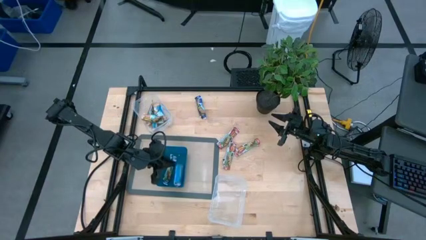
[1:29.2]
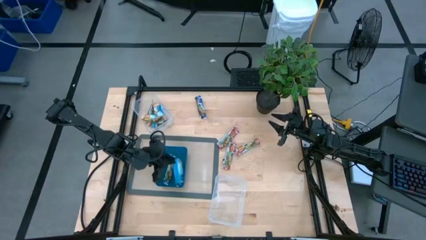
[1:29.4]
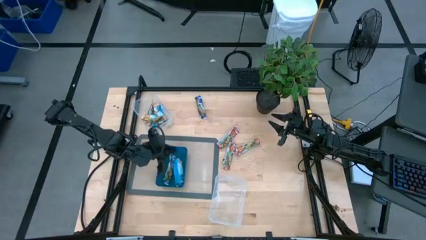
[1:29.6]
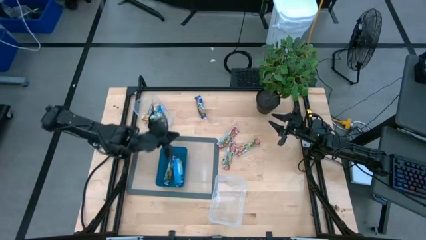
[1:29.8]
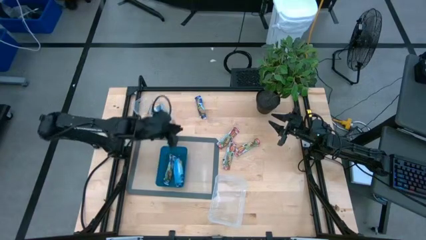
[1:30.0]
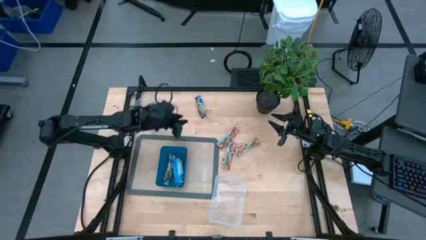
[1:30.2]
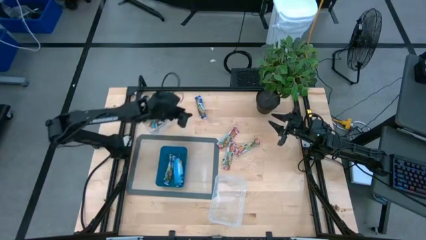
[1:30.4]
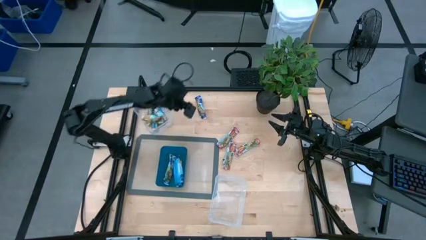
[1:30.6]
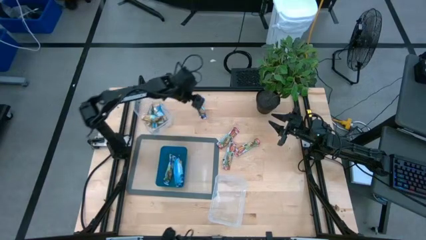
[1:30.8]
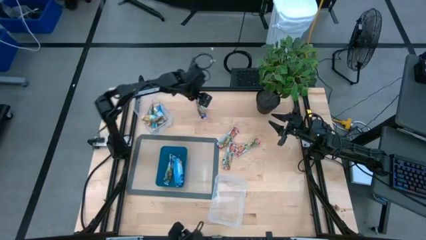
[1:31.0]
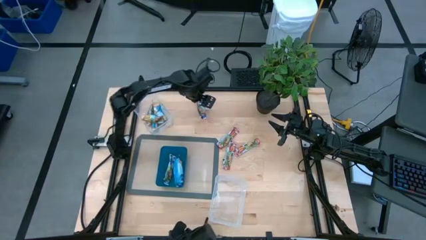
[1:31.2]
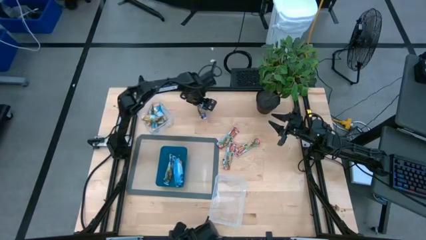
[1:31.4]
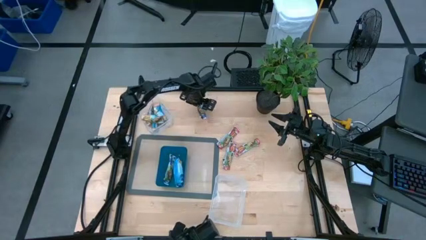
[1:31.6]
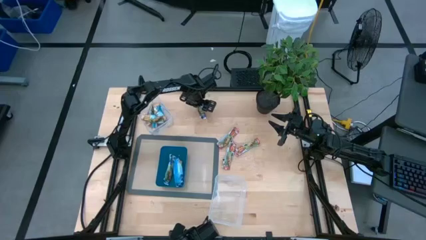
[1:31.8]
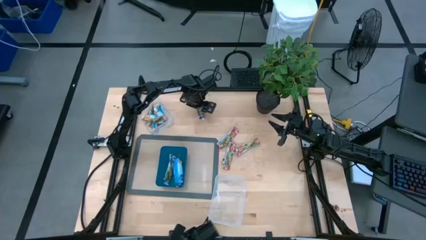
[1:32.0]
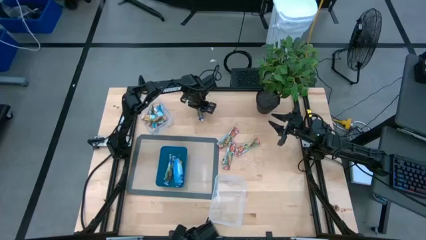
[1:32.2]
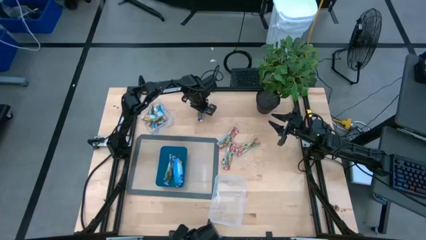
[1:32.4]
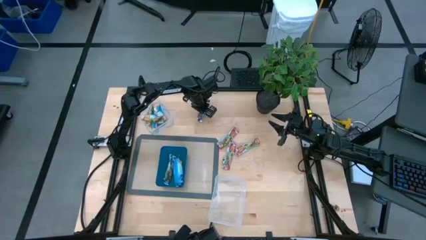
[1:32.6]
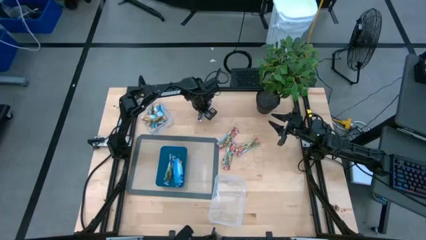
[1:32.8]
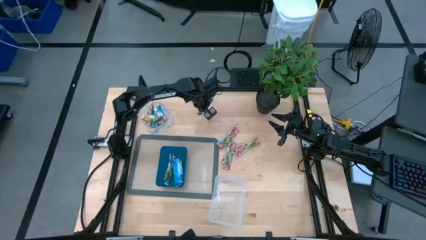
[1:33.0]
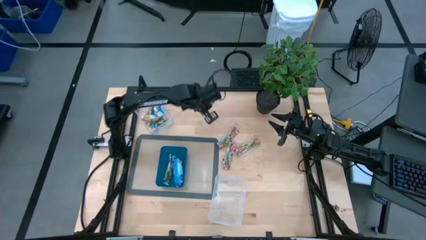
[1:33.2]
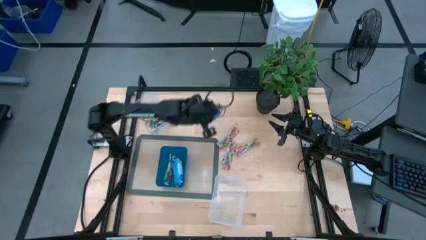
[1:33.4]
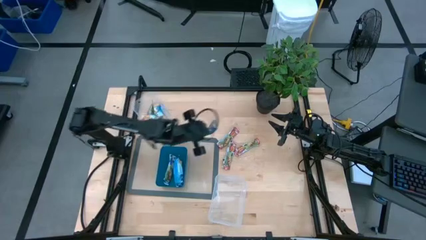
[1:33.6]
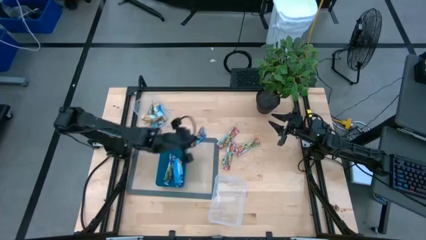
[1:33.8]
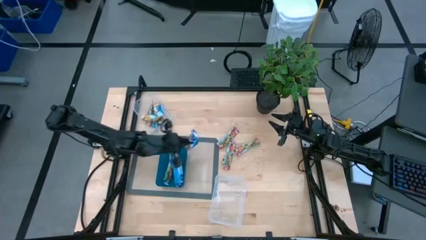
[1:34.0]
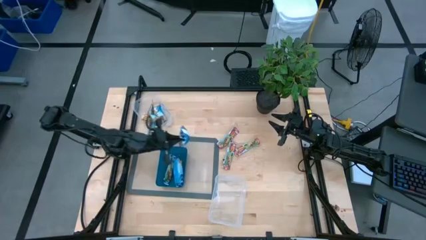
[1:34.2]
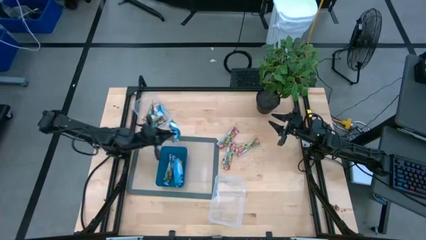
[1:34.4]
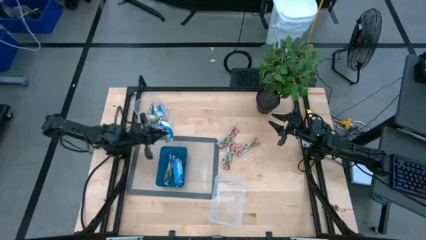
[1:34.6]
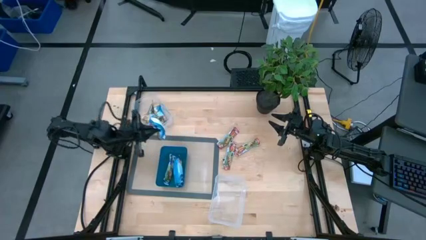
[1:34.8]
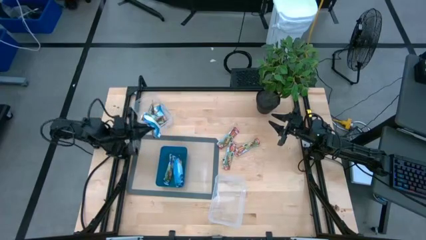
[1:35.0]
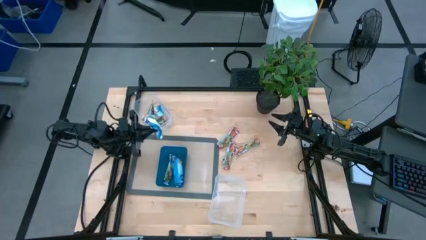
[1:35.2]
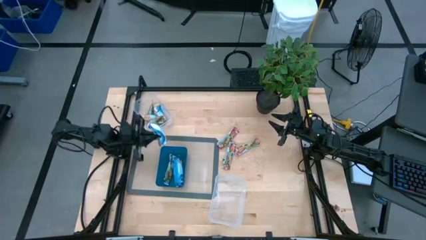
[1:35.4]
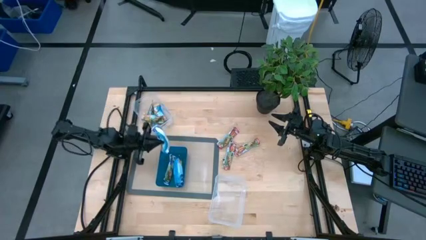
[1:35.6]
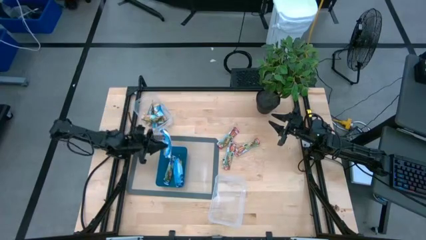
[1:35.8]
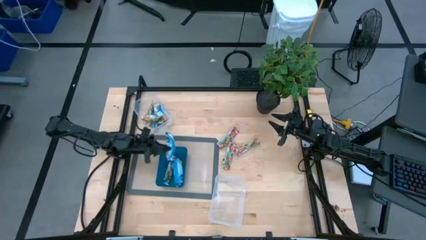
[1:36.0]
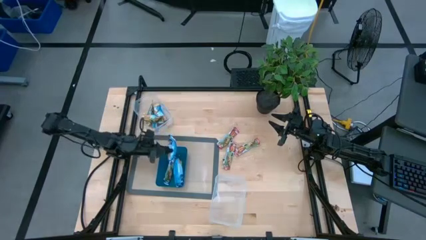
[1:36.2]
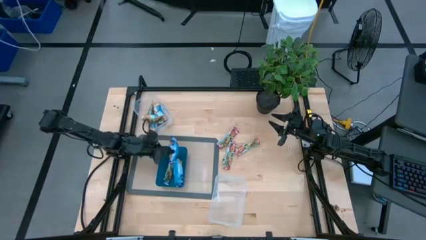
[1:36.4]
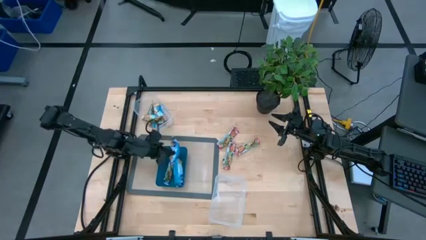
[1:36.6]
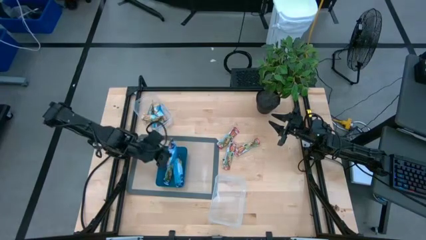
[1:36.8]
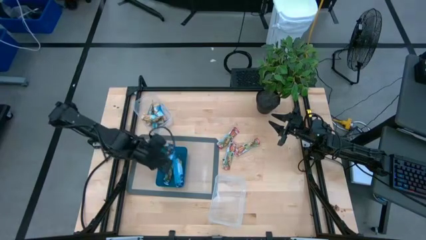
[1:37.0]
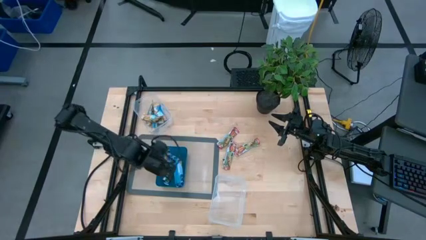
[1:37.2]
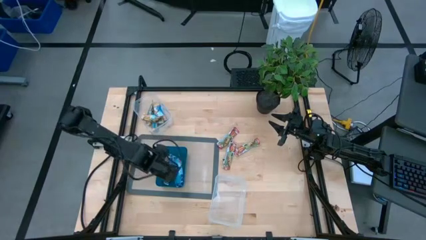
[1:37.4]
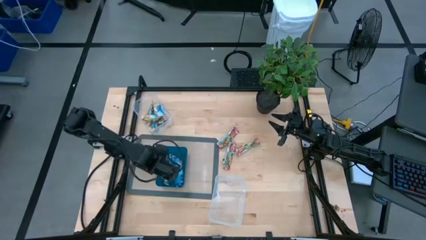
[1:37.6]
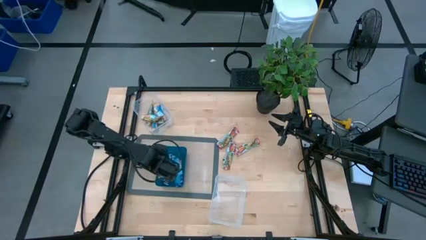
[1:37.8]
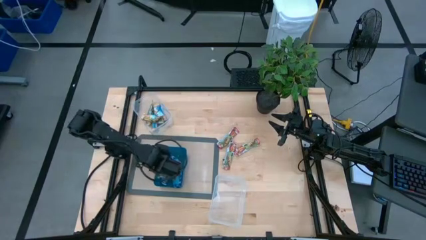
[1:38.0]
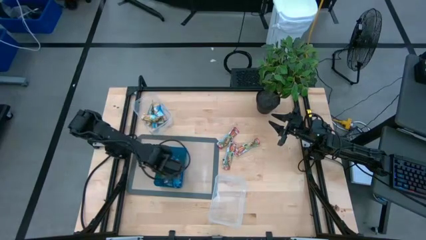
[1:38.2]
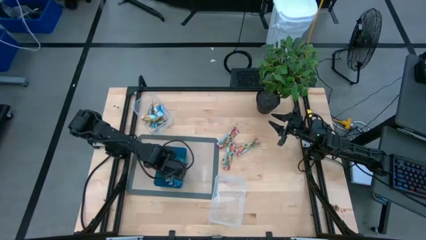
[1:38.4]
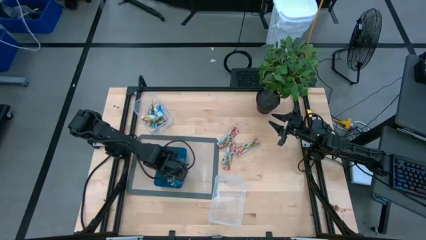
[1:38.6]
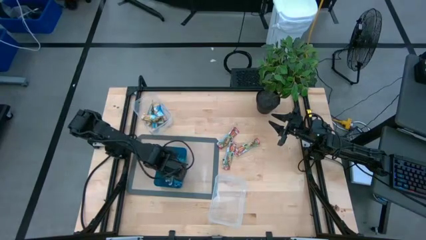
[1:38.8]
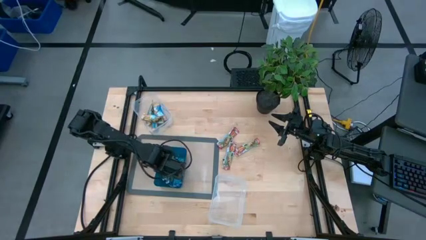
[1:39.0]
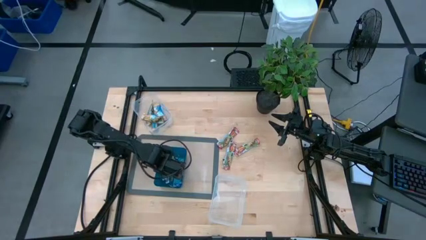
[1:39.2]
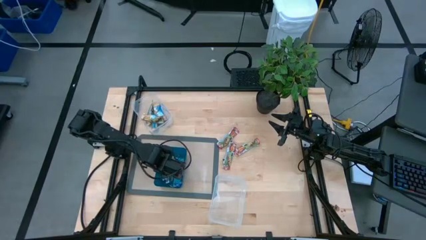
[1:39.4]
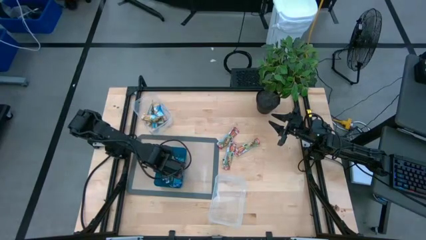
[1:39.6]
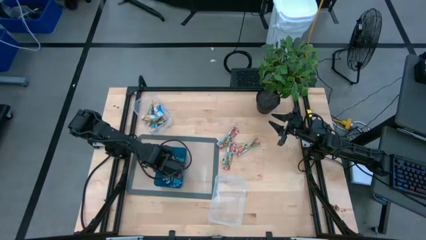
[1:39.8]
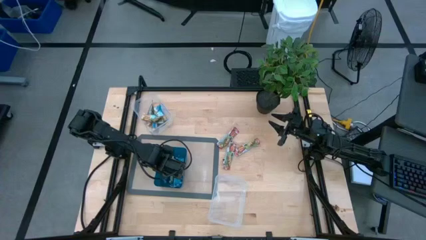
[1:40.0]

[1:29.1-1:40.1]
Task: Pick and place Granola Bars by type
Put the blue granola bar into the blue bin

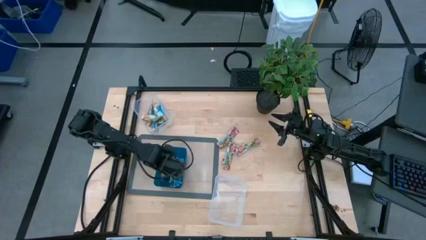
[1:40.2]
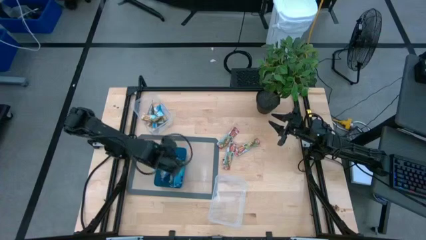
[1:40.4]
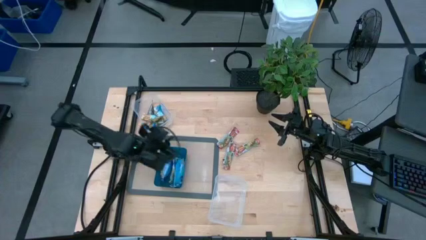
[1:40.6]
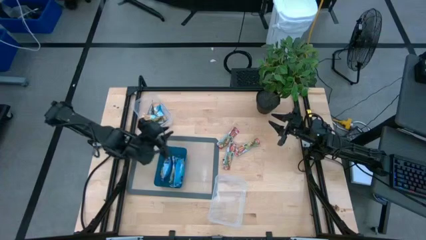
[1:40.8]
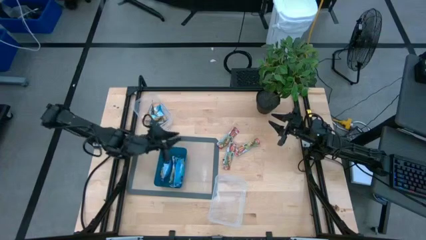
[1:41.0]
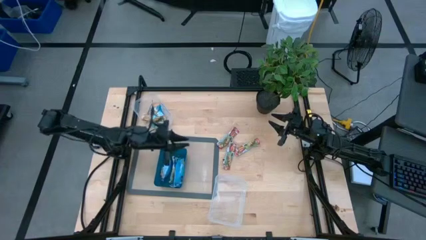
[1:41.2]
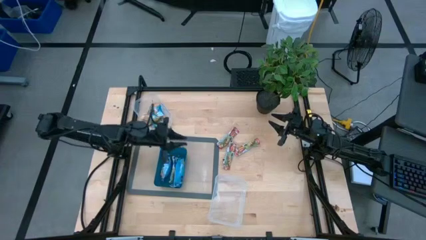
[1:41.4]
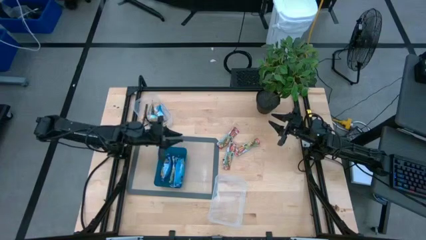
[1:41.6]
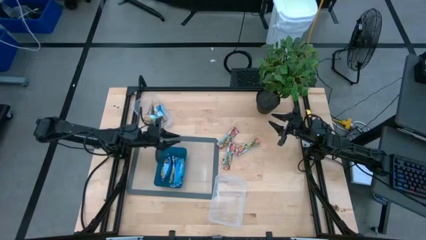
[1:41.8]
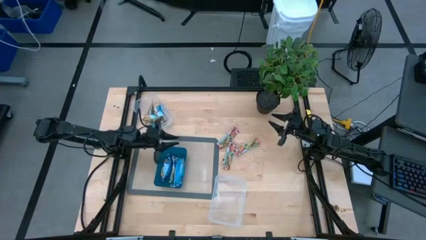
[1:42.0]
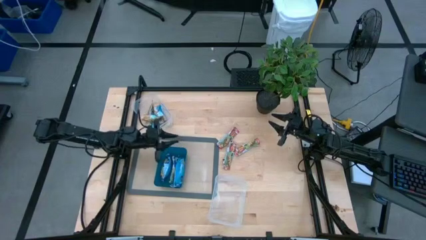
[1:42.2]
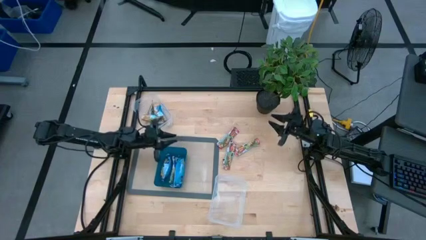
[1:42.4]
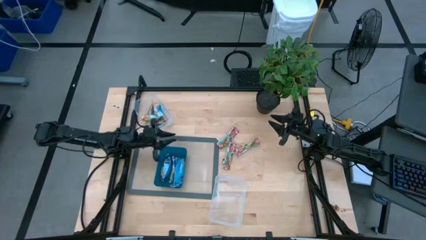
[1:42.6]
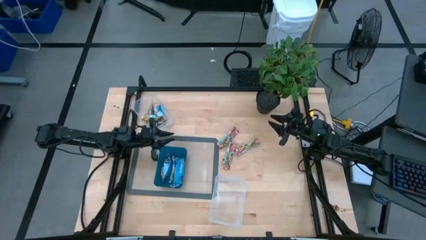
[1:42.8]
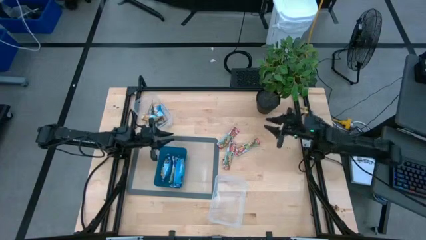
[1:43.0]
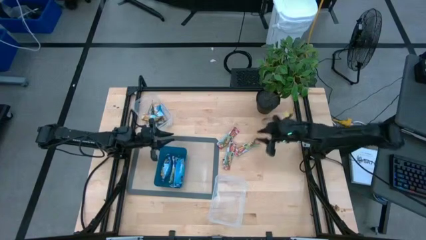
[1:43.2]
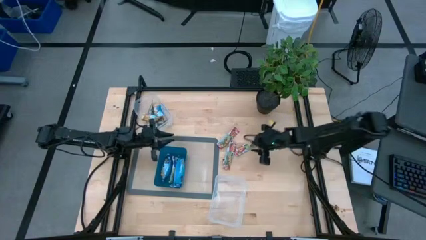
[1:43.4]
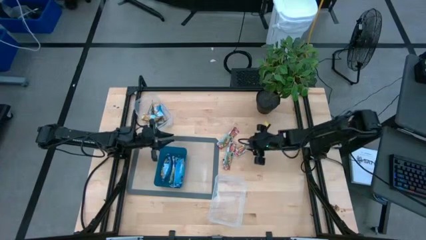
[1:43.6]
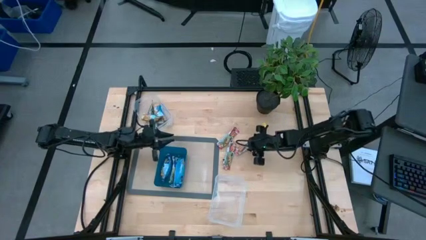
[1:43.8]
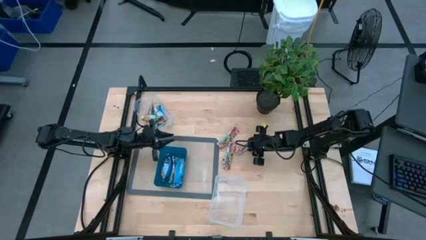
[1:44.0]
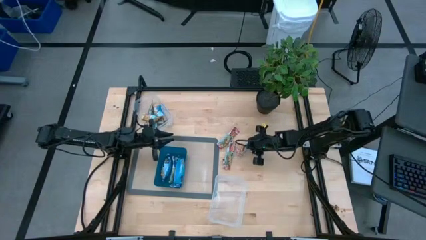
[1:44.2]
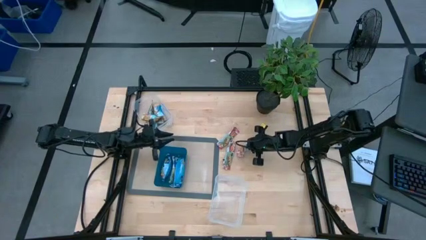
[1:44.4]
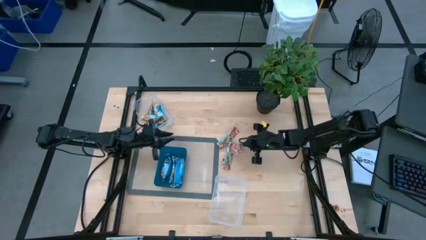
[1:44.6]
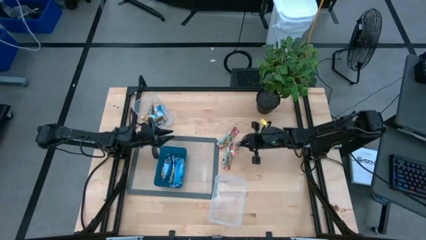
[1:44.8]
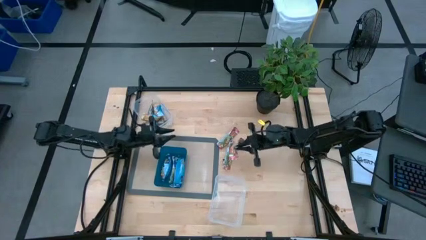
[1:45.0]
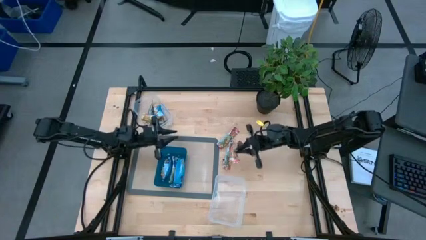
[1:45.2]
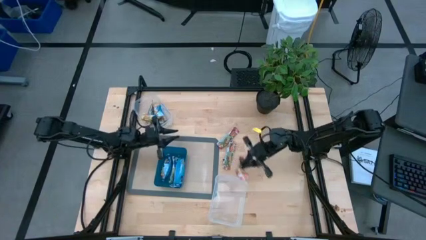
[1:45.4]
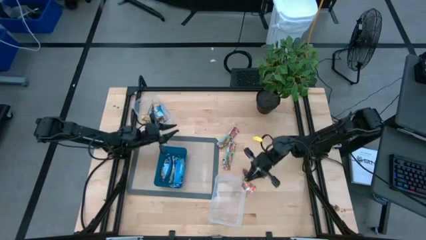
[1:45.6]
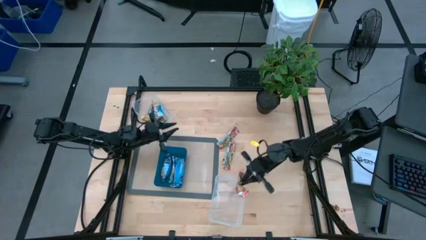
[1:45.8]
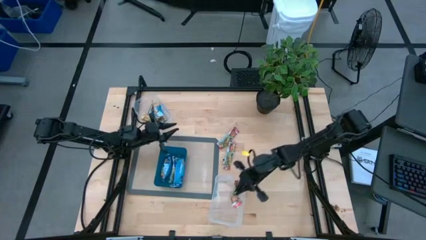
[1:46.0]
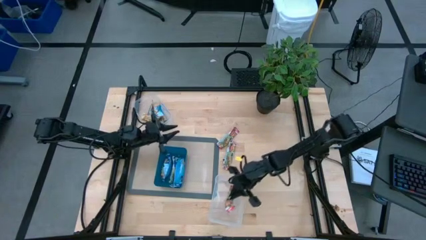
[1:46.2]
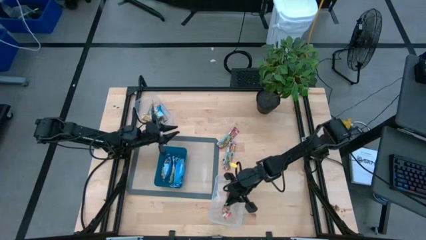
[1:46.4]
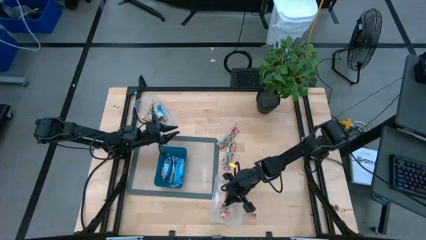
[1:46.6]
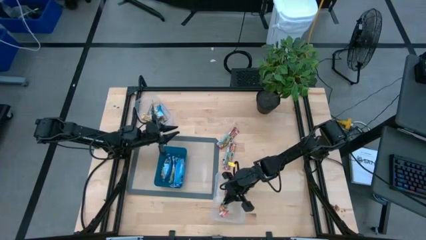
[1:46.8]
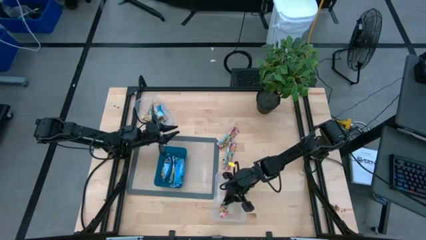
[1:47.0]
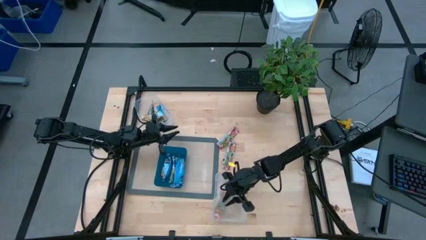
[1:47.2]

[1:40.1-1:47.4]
Put the right red granola bar into the bottom transparent bin
